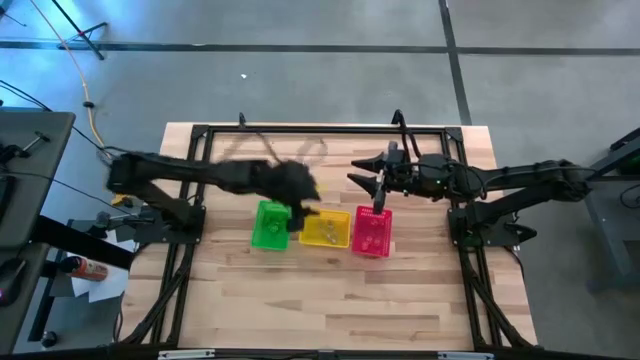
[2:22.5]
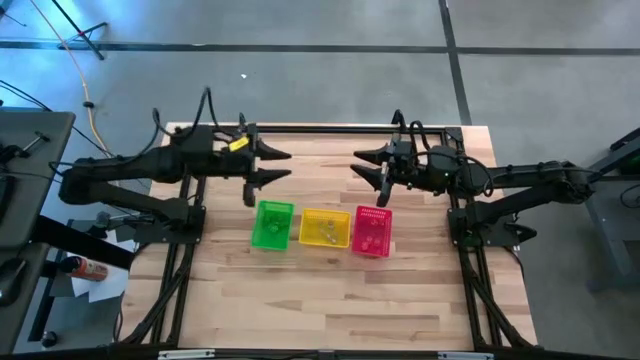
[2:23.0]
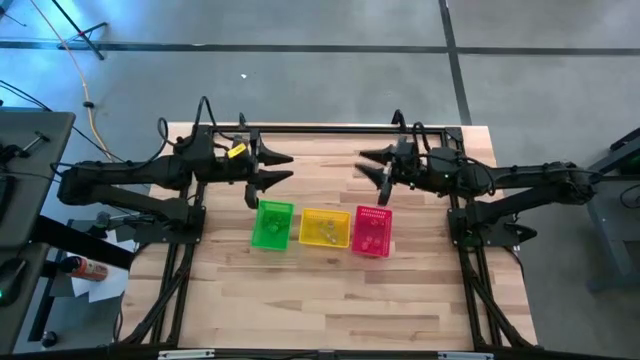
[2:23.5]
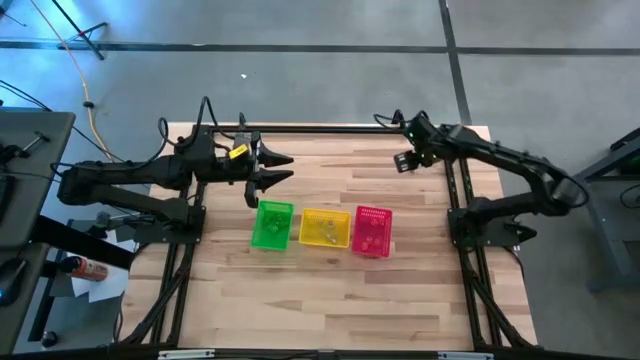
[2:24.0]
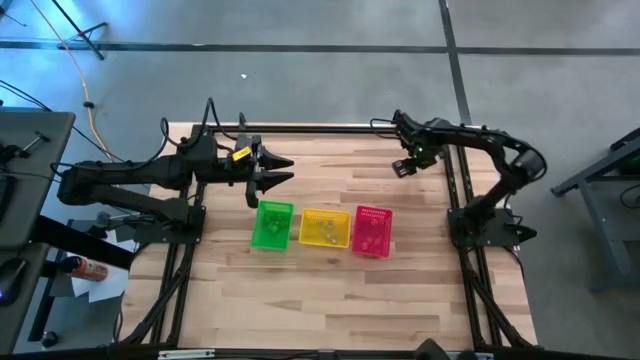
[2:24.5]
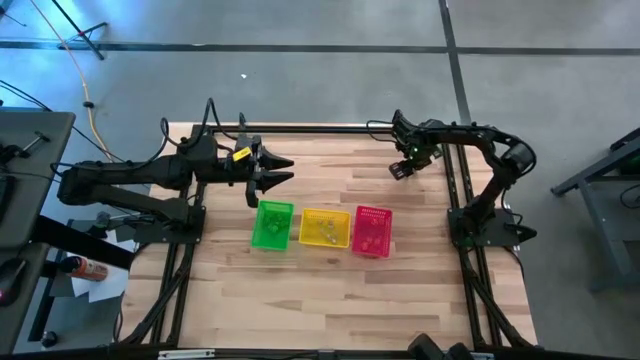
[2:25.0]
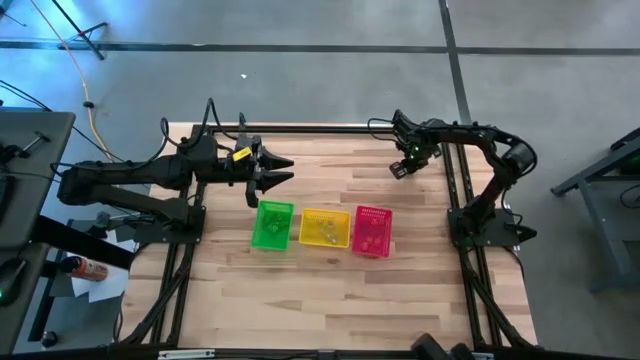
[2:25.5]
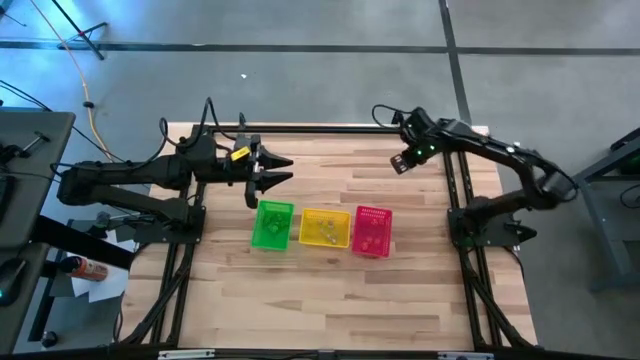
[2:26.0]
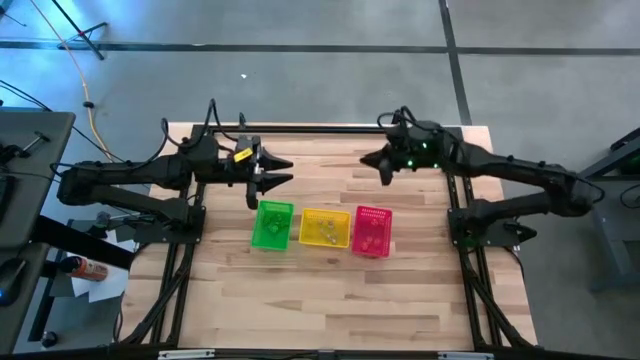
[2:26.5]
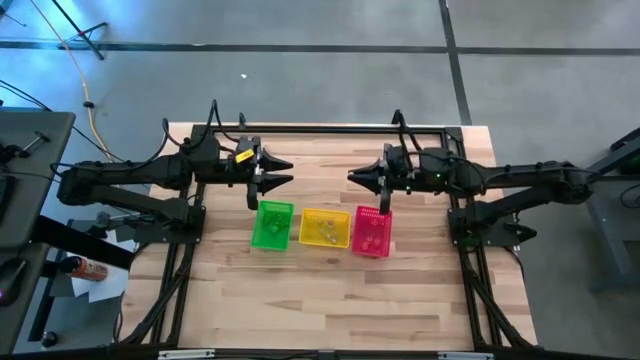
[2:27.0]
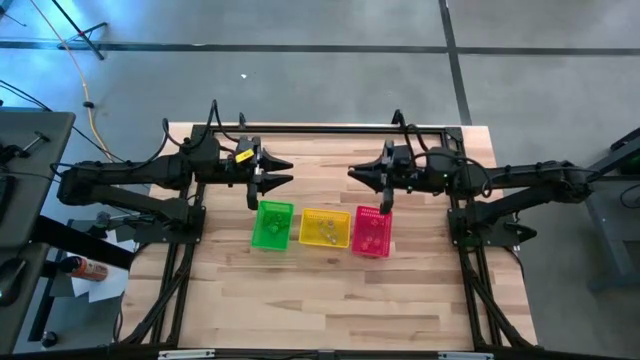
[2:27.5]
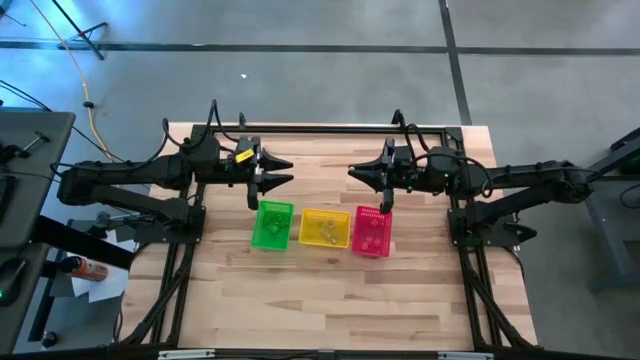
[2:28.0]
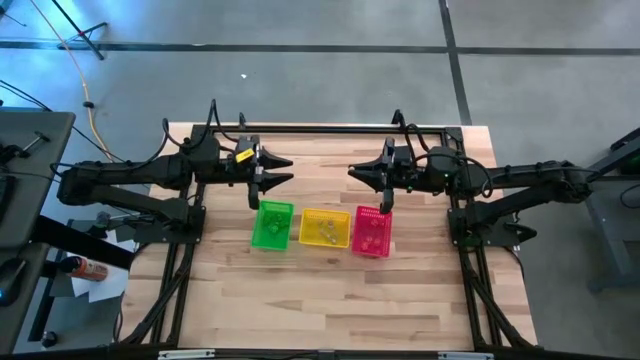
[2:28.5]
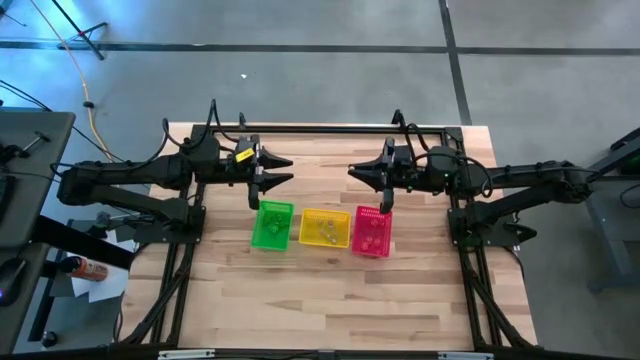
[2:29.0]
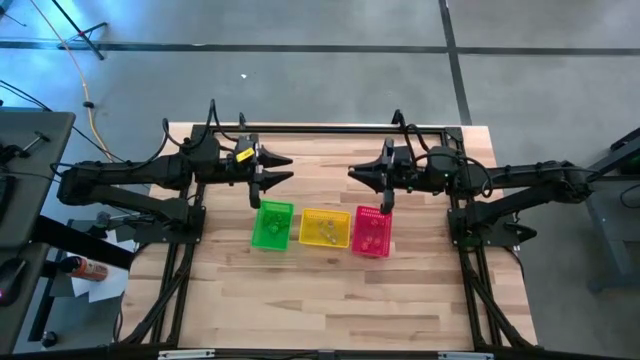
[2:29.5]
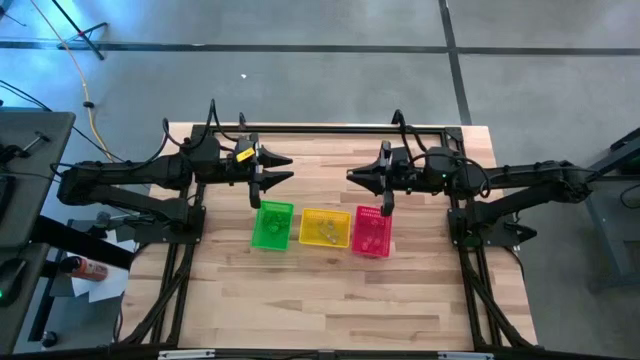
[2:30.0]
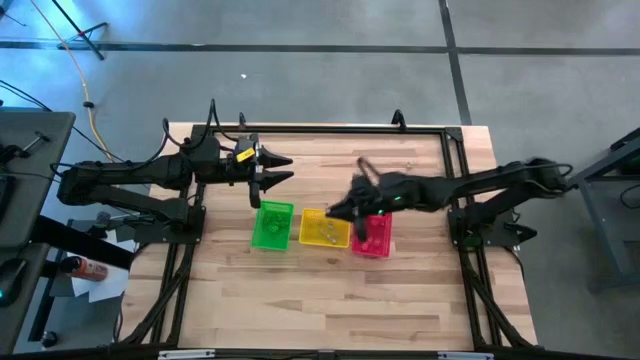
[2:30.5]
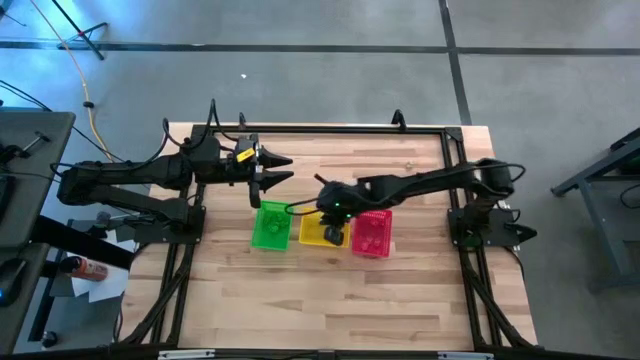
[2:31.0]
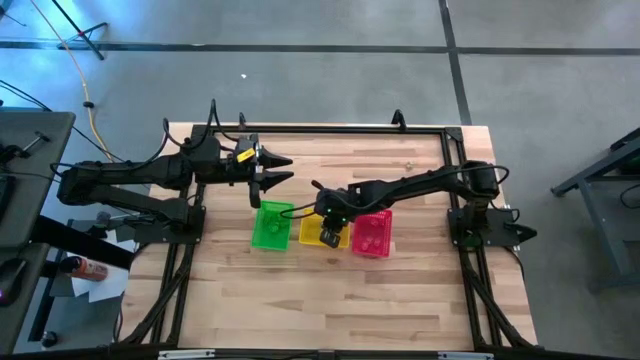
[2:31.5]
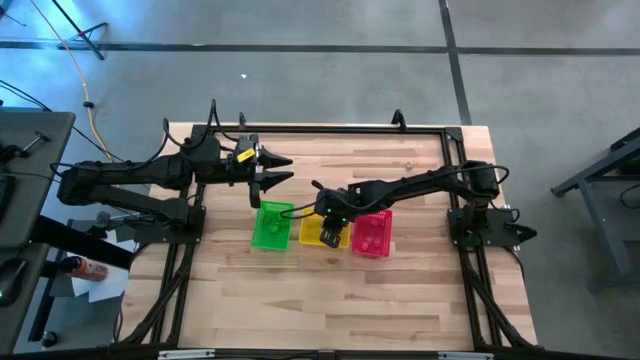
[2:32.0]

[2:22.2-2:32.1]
Task: Sort Halloween decoration
Put the white skull toy into the yellow basket

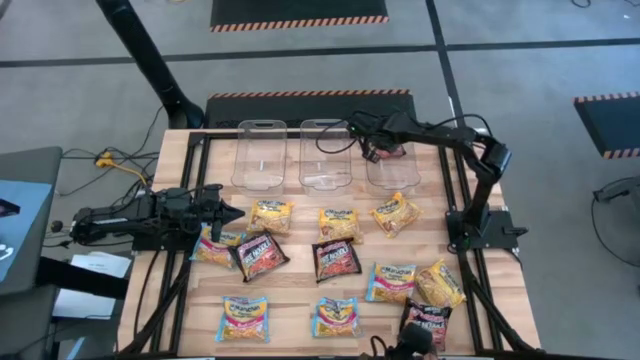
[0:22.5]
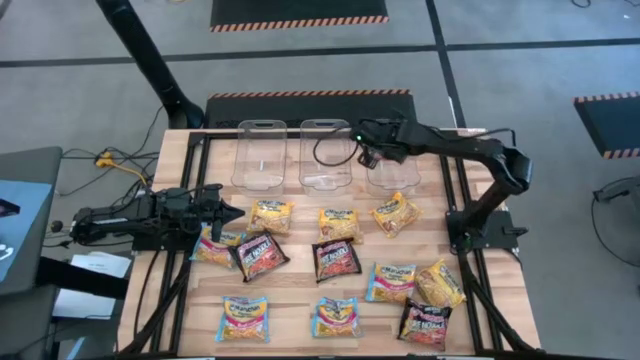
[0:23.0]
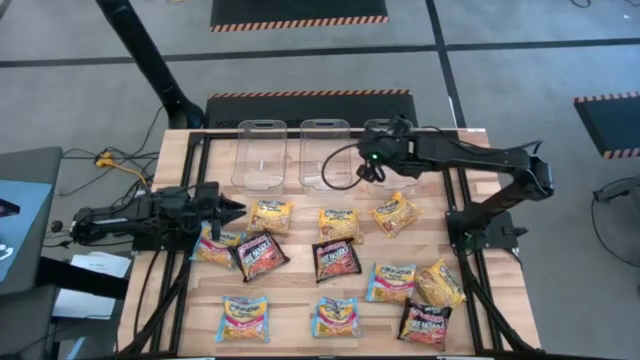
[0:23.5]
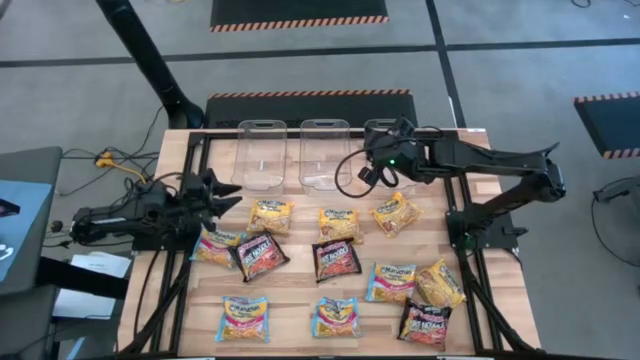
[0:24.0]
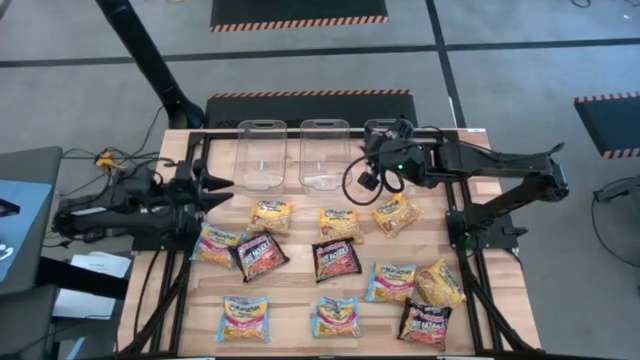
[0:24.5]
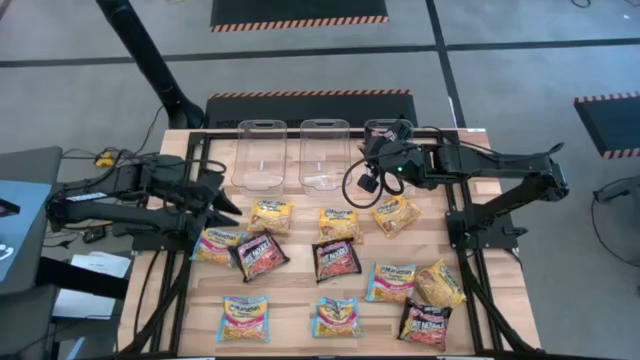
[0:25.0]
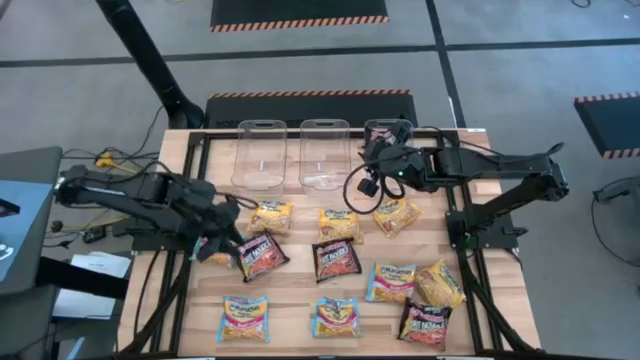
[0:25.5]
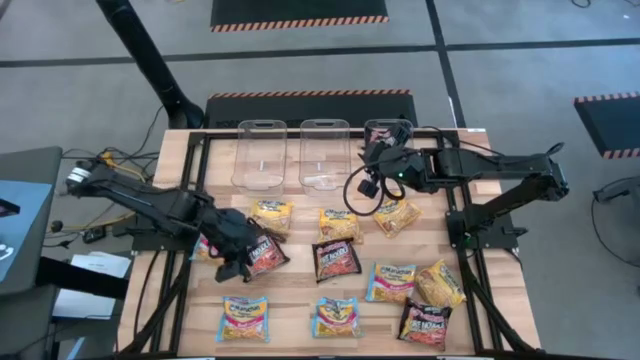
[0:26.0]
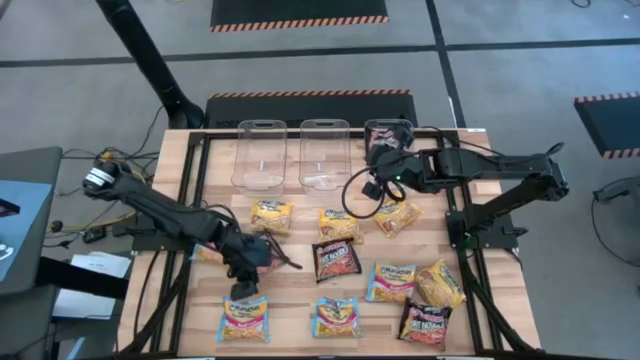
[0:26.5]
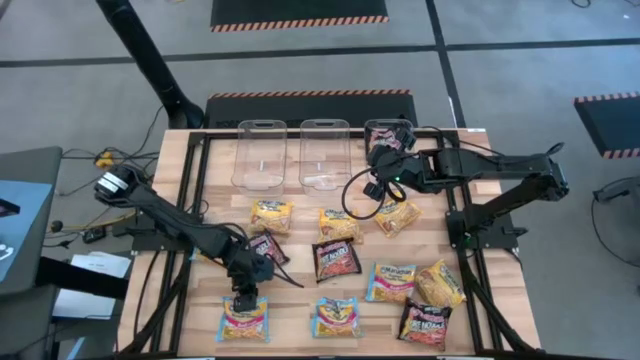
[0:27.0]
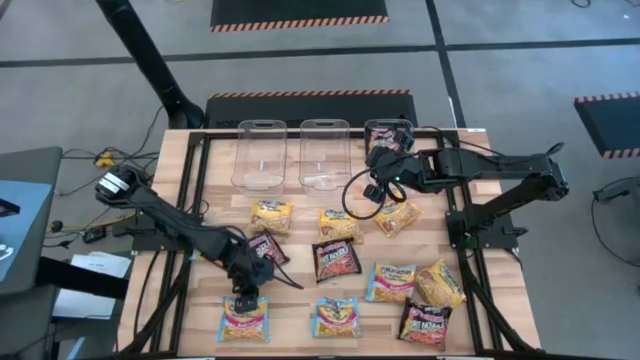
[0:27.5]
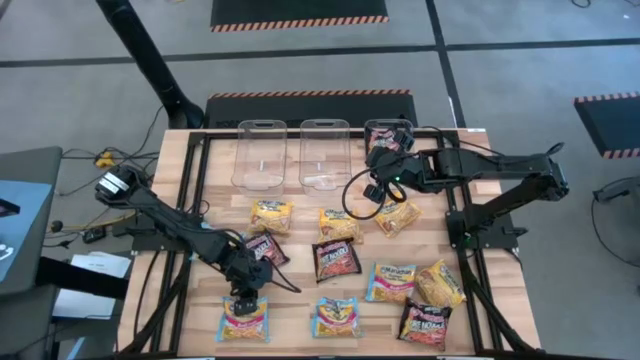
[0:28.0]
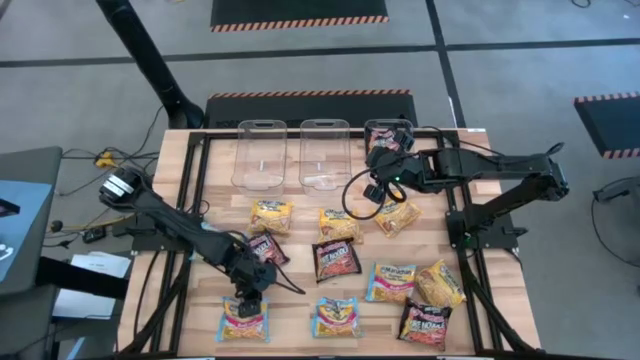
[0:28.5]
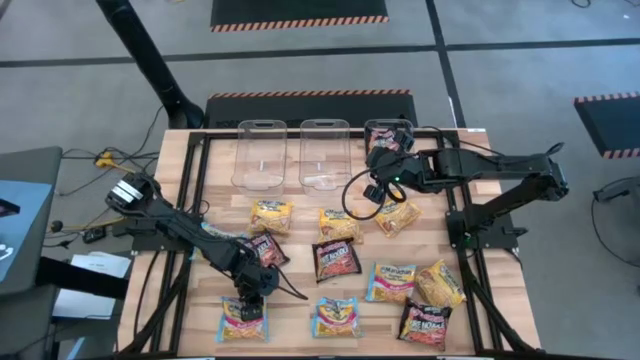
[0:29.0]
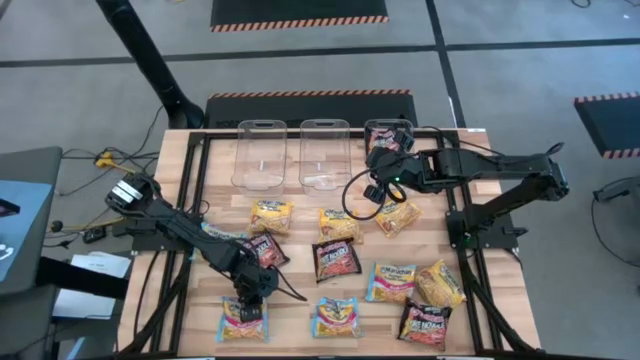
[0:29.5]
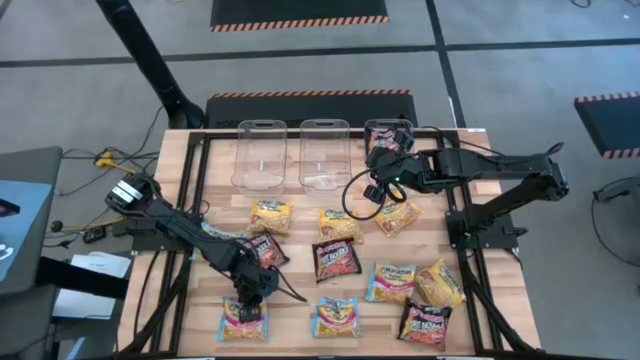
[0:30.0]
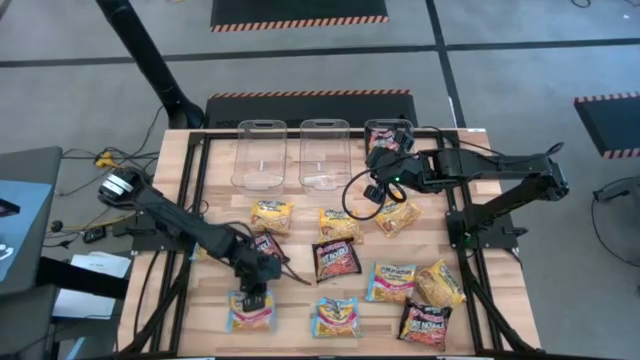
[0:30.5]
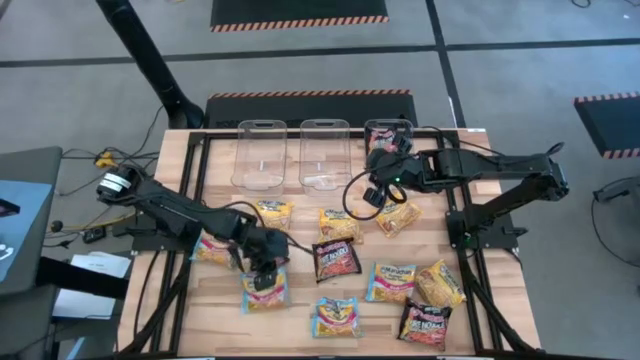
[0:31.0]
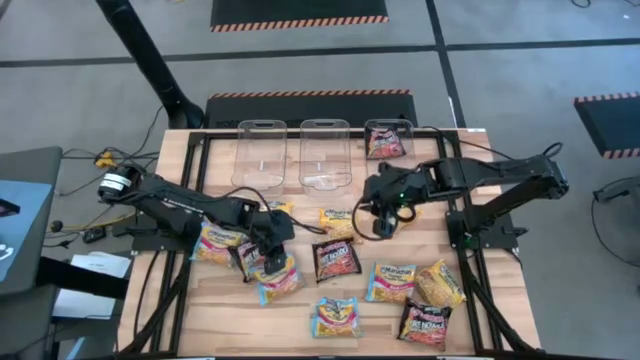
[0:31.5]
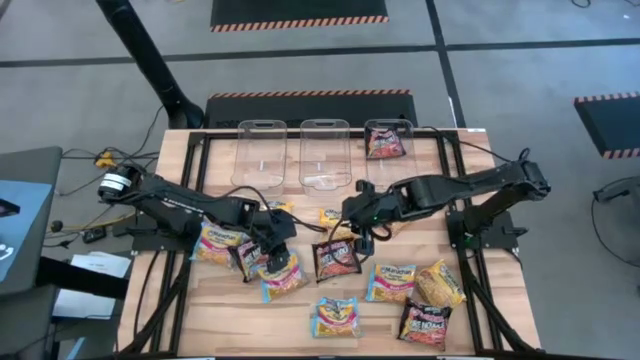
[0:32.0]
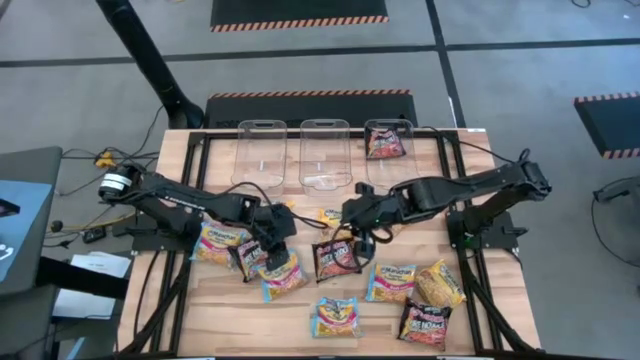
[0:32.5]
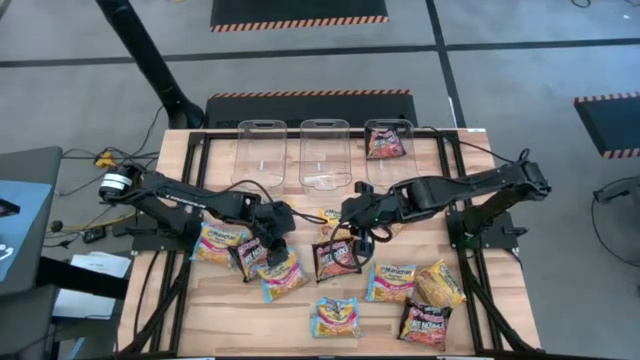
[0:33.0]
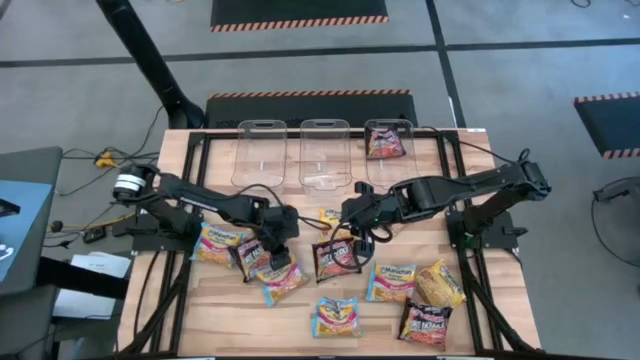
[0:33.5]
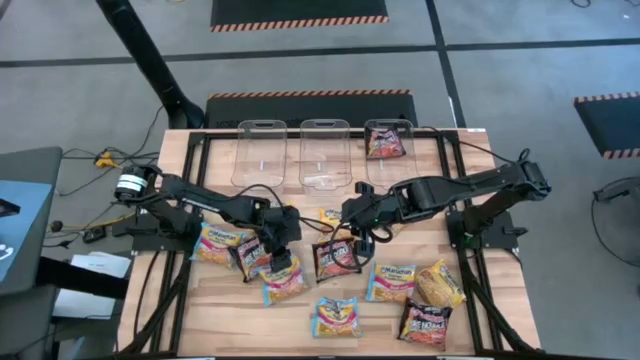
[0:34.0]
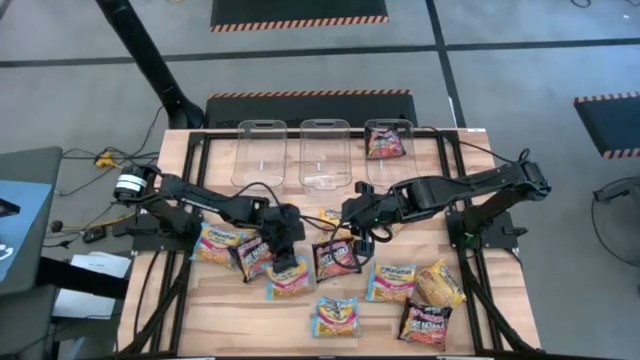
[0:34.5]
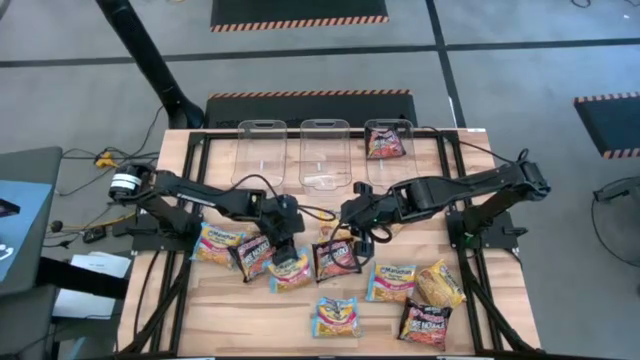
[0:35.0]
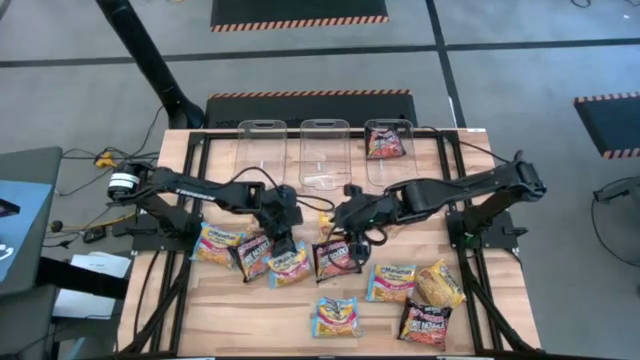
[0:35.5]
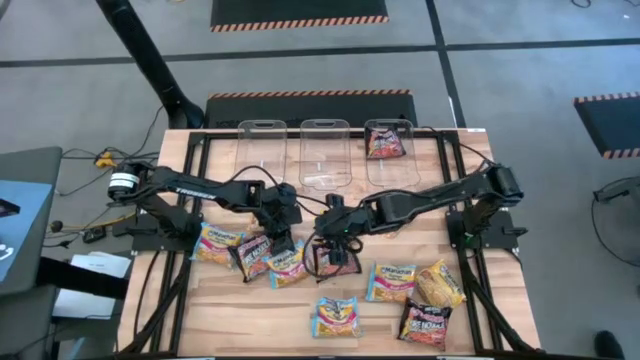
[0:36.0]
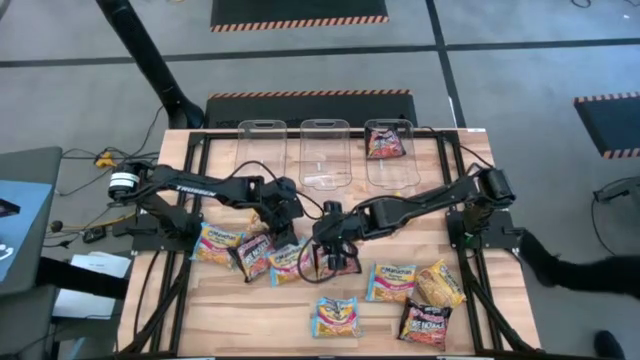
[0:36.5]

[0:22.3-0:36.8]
Task: Sort Maruchan noodles
Put the blue noodle pack into the middle transparent bin
